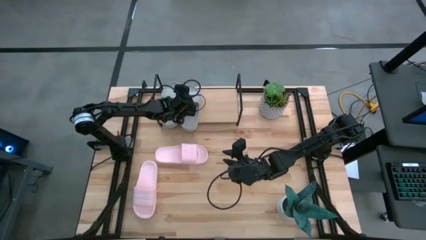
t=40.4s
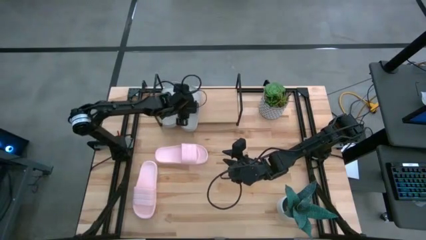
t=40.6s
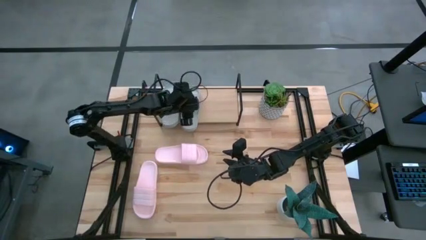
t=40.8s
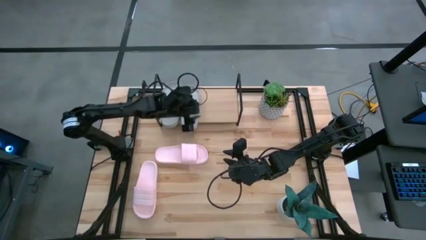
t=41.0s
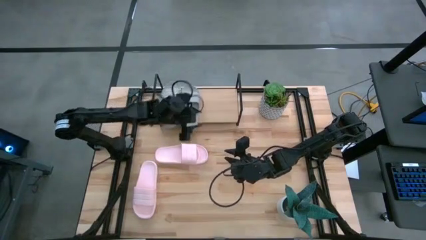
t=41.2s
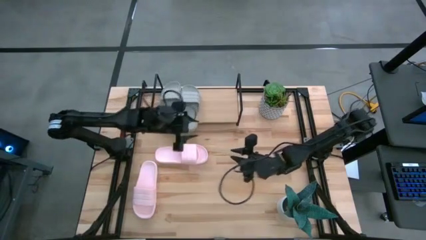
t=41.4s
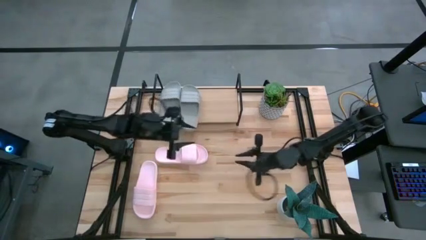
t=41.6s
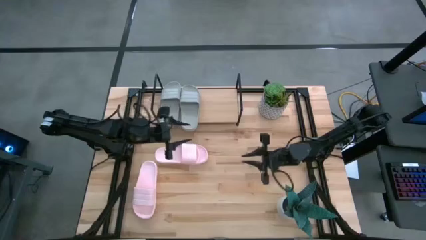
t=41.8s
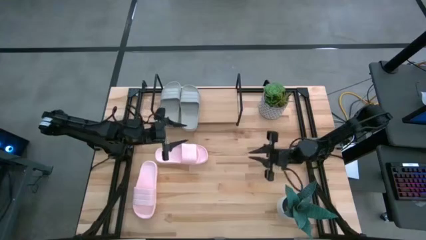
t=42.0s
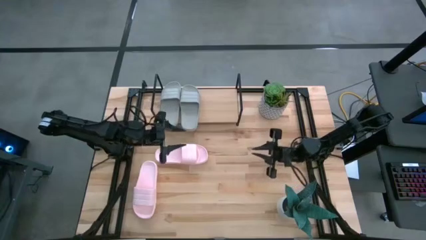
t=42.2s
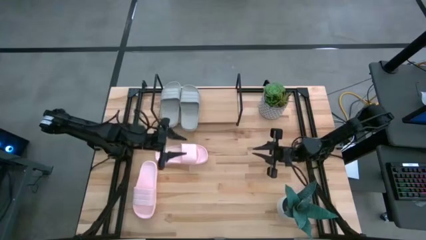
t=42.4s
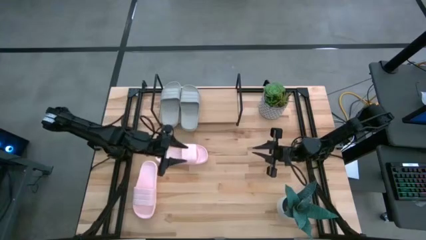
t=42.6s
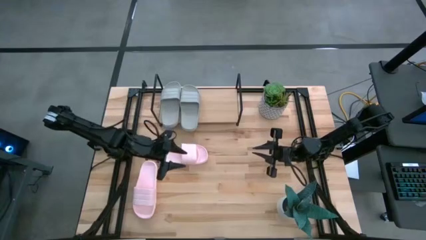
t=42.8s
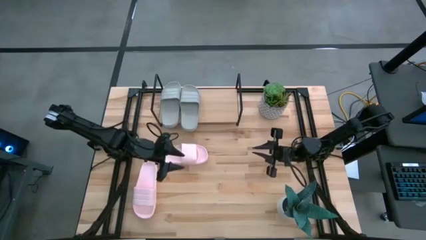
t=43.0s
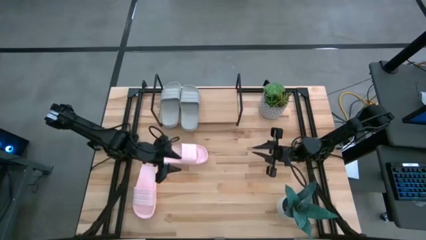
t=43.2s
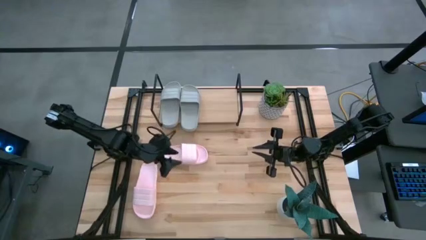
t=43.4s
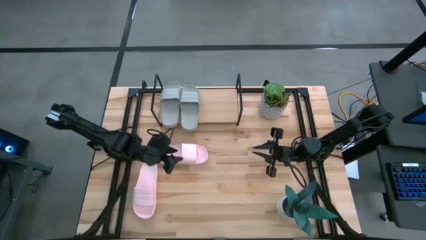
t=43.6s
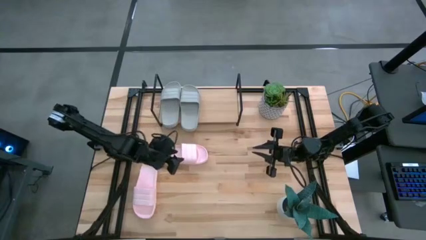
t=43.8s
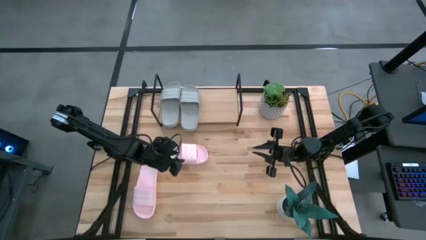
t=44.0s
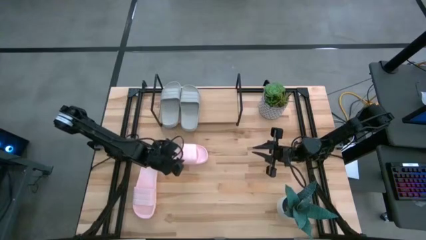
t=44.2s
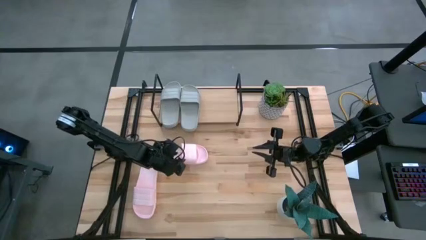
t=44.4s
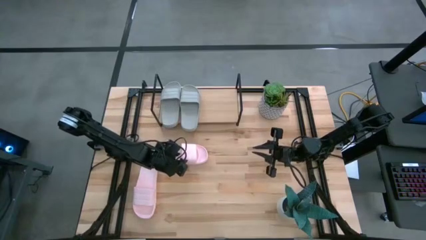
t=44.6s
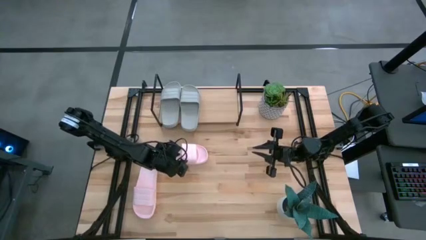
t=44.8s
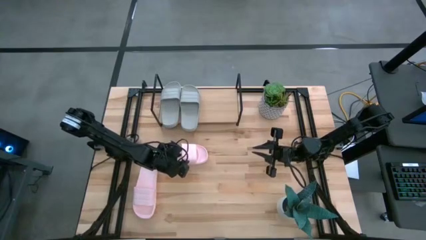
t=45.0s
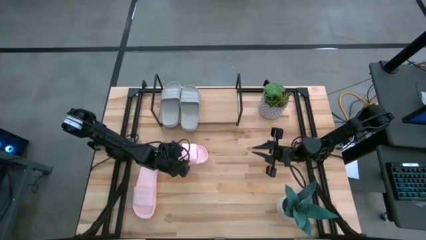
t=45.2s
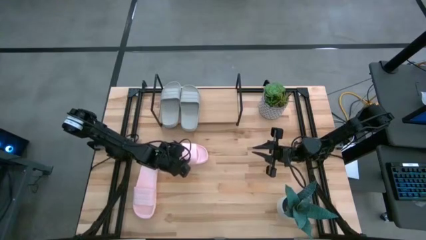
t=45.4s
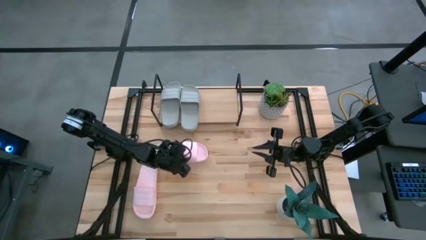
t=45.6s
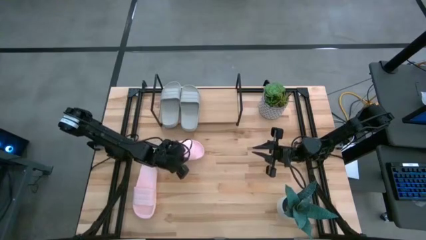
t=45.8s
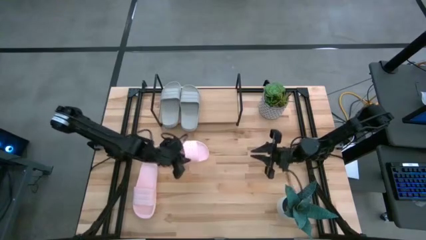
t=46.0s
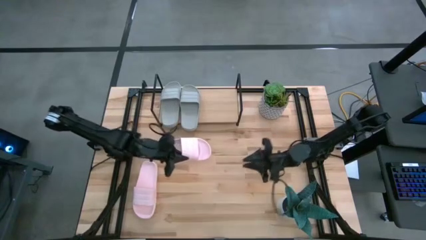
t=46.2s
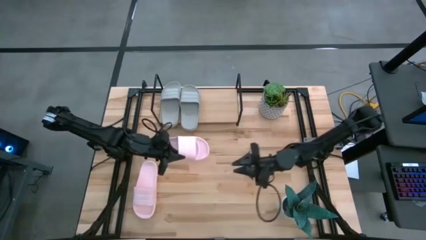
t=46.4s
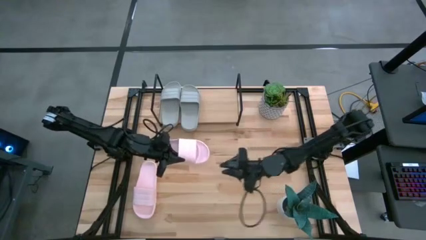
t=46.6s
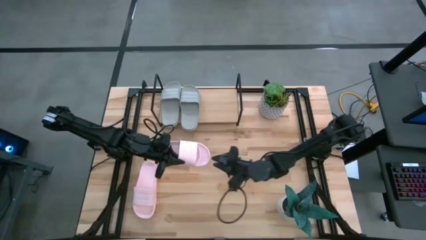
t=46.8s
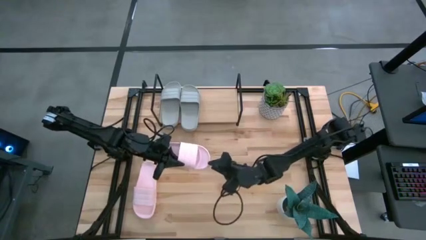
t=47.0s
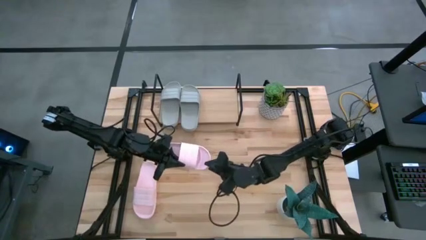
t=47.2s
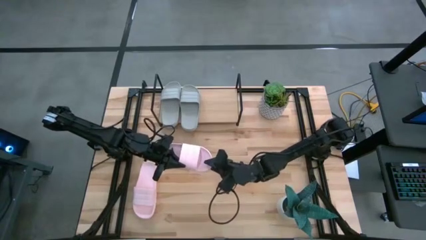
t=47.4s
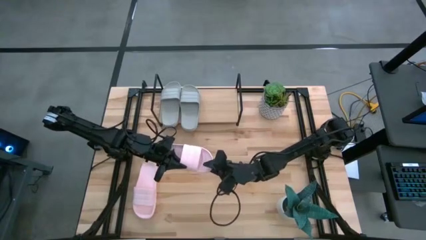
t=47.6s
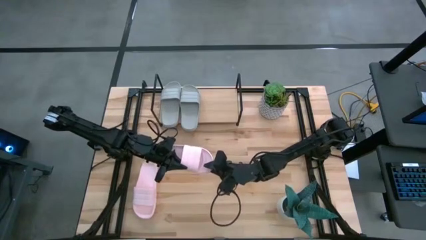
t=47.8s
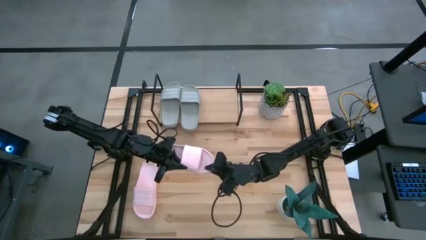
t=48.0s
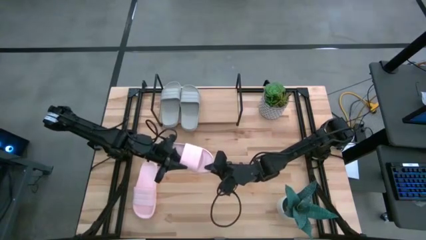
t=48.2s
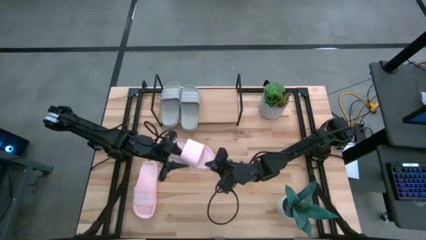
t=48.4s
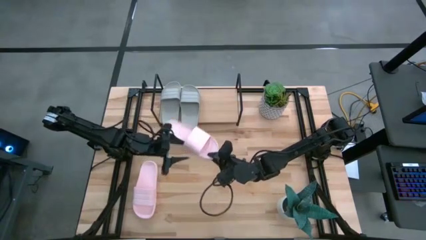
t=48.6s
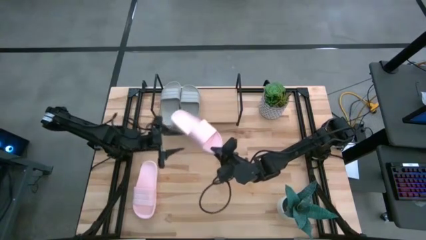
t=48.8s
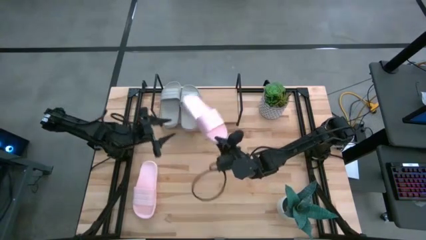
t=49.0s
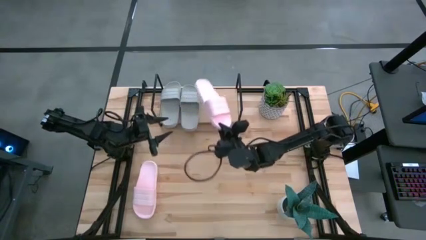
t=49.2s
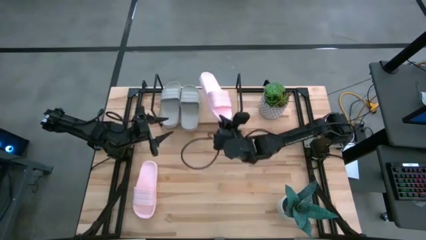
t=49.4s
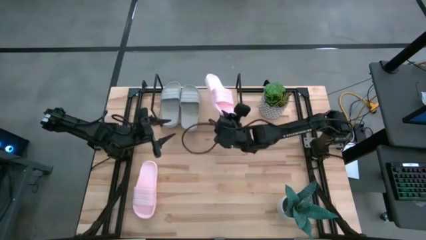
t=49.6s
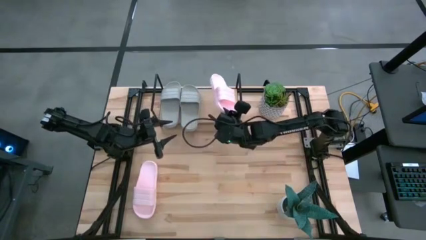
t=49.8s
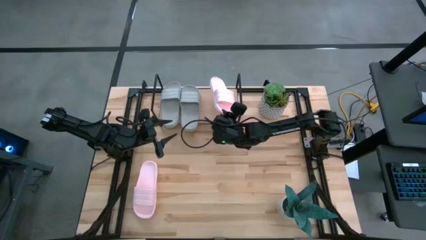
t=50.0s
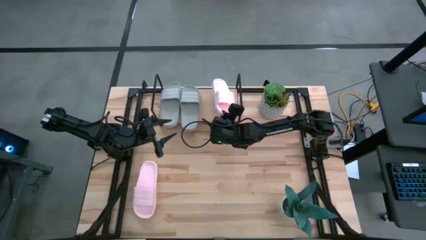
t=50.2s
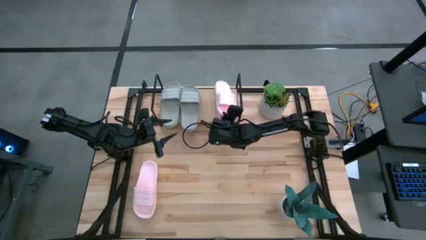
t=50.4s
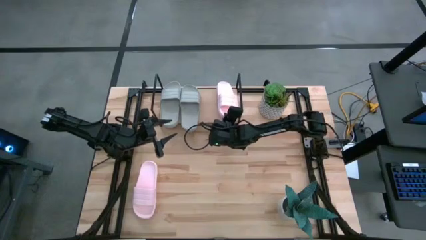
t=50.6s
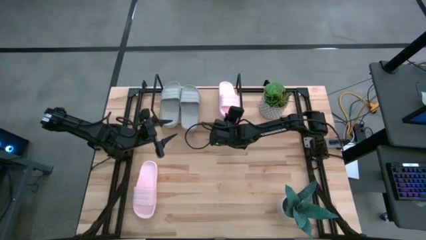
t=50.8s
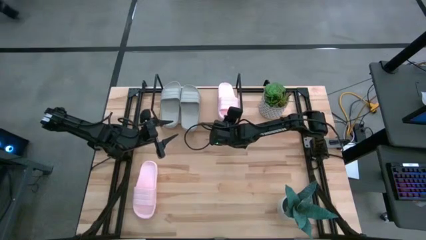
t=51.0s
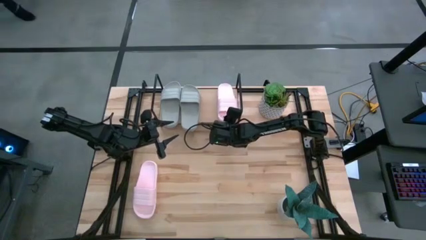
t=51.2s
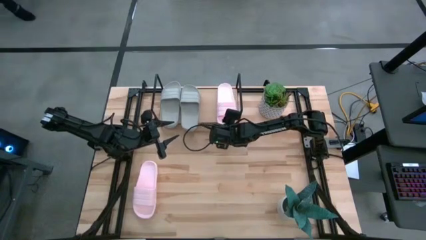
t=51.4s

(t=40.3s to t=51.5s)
Task: Pick and place slides into the shelf
Put the right pink slipper on the shelf

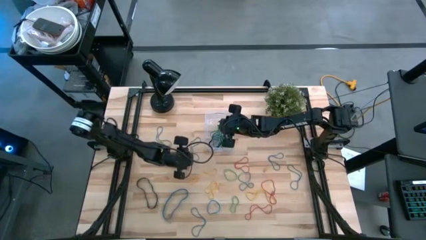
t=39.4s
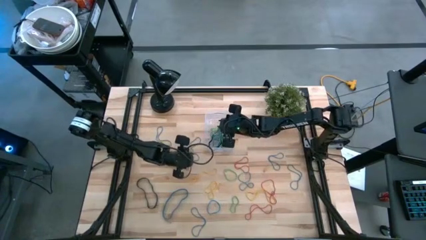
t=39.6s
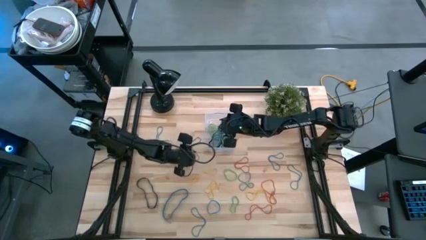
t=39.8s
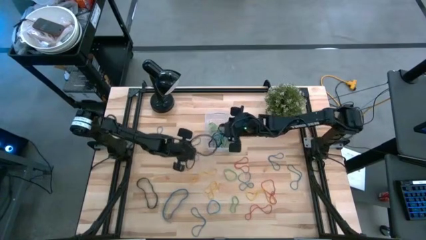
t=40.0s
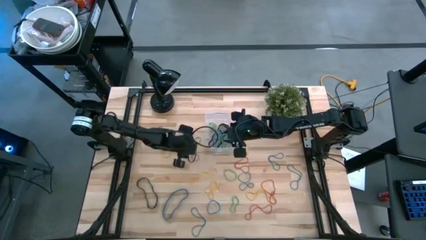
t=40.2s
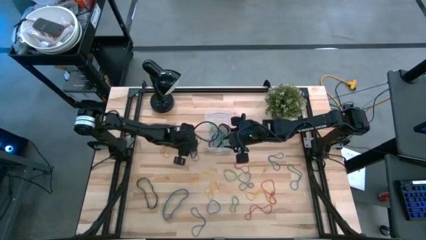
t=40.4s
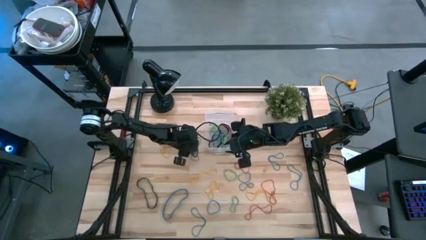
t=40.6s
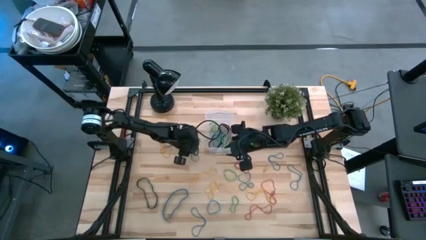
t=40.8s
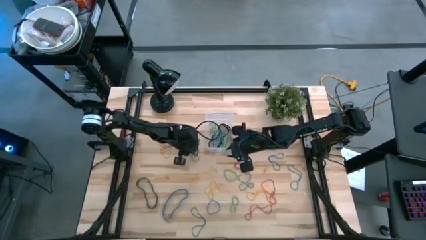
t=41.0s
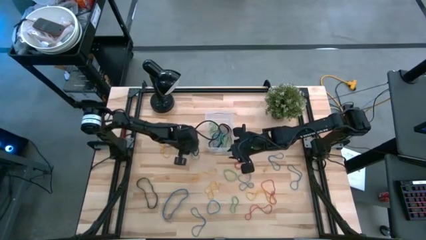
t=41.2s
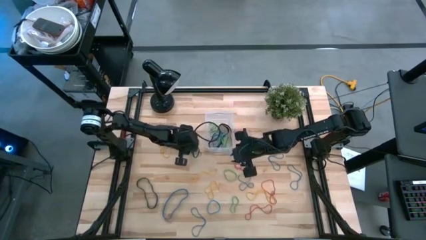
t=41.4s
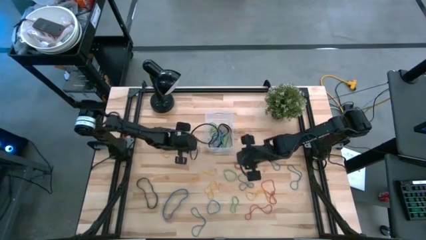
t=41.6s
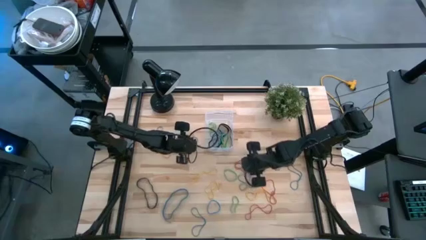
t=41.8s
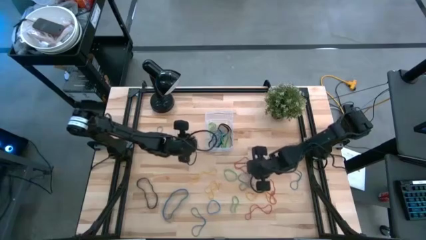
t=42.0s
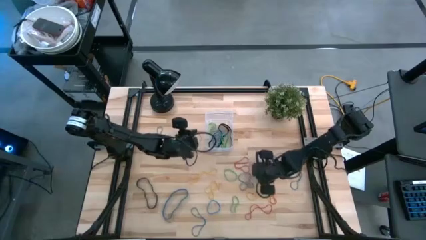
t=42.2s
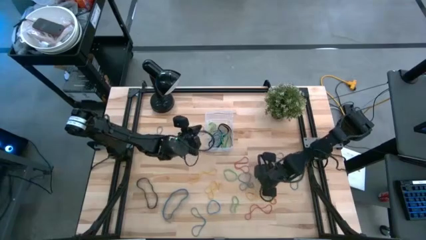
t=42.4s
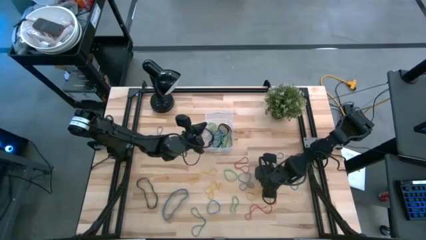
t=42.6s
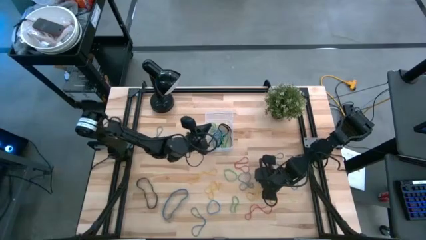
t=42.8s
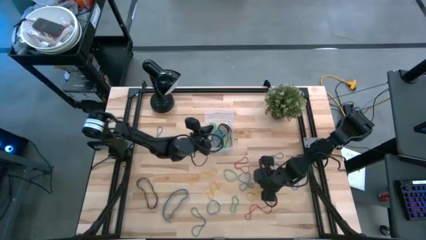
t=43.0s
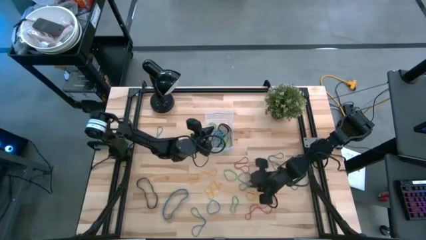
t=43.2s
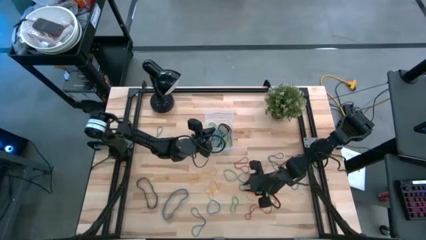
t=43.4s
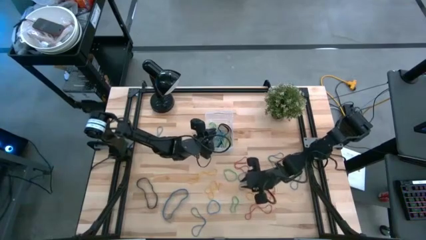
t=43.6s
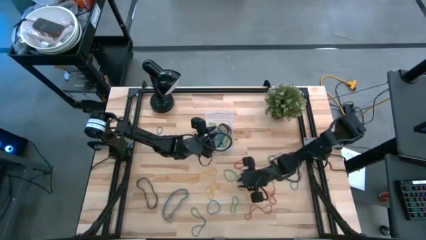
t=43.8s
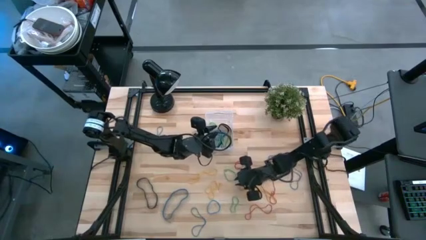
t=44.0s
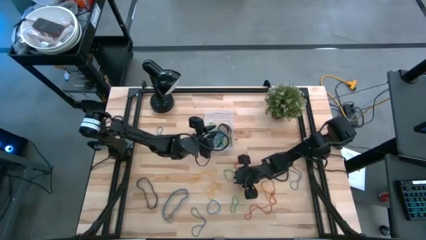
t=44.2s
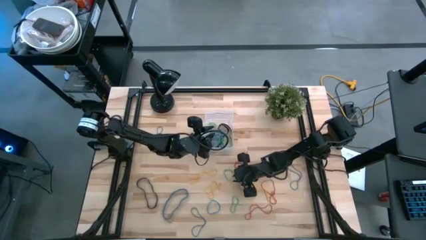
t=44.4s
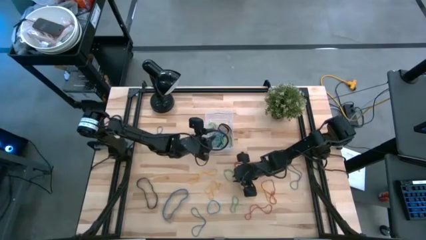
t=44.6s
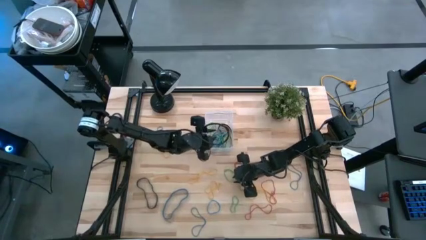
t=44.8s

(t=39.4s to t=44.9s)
Task: Pick and place rubber bands into bin
Put blue rubberband into the transparent bin
